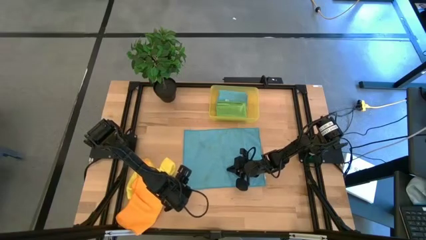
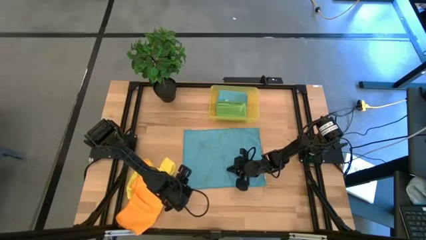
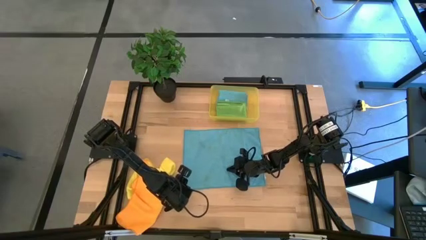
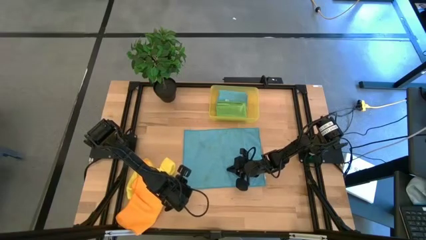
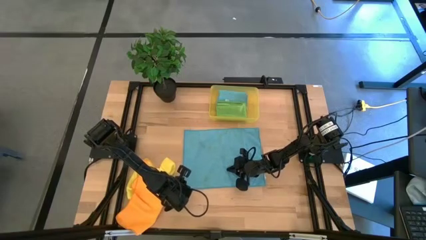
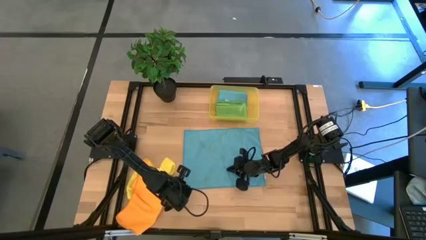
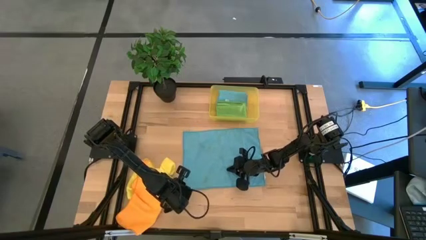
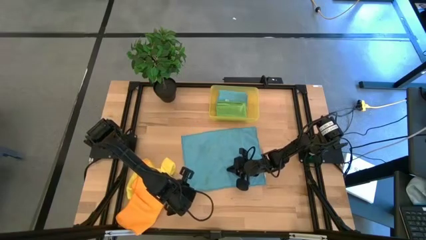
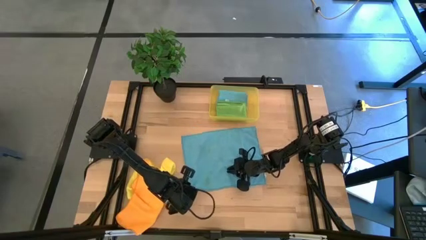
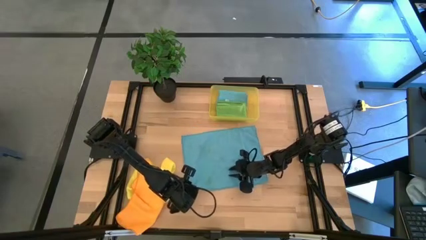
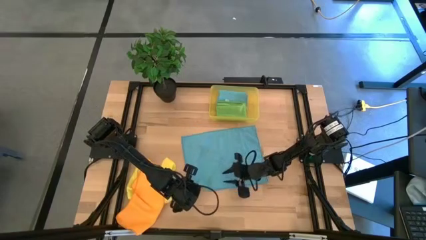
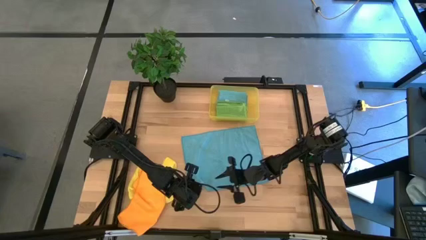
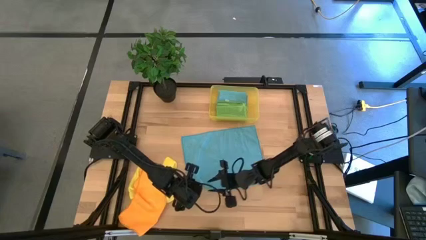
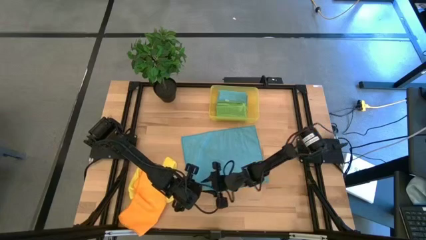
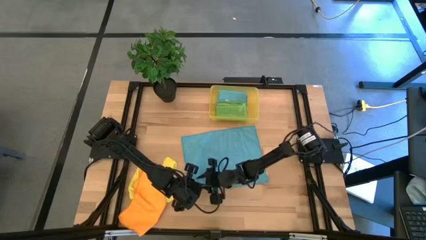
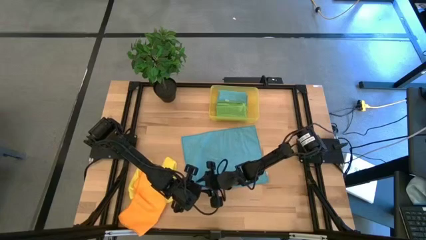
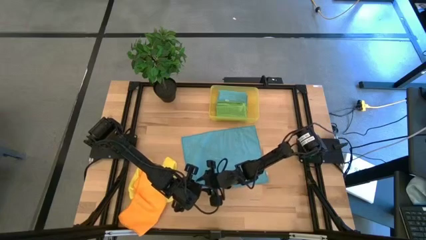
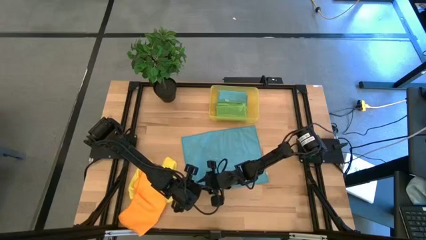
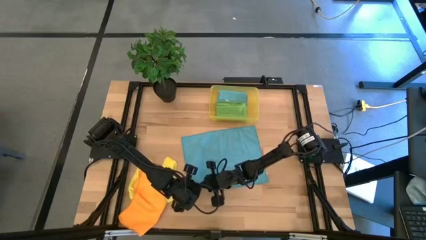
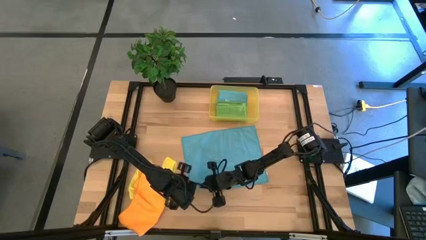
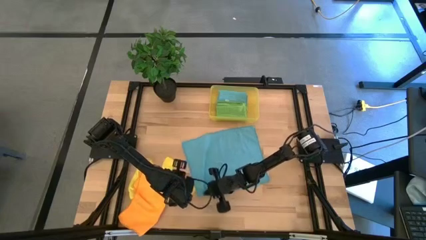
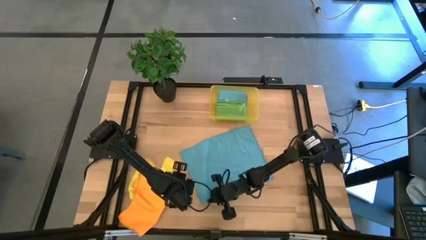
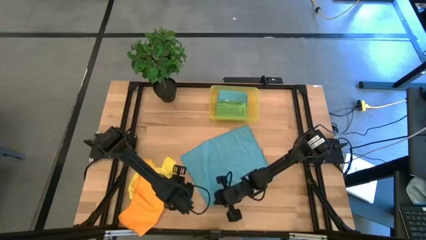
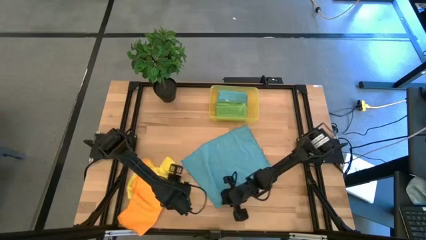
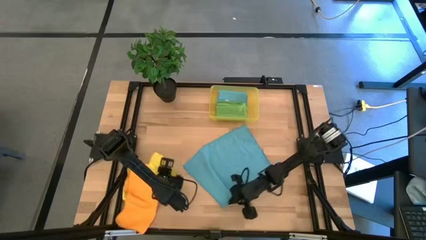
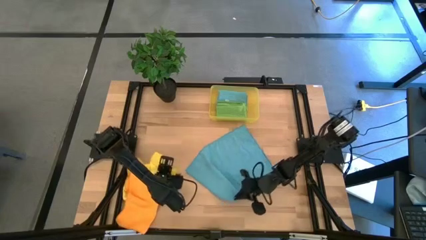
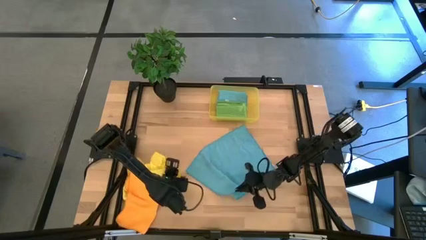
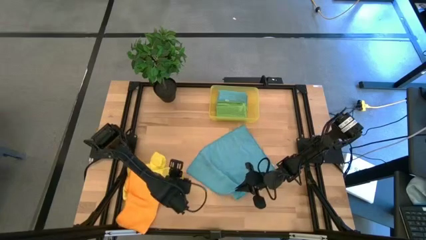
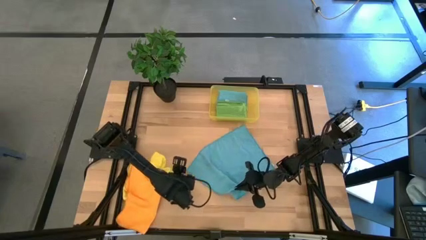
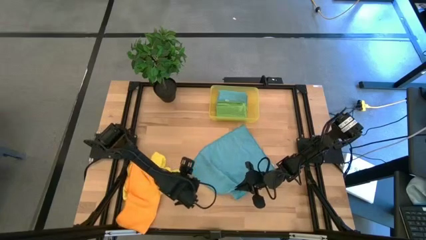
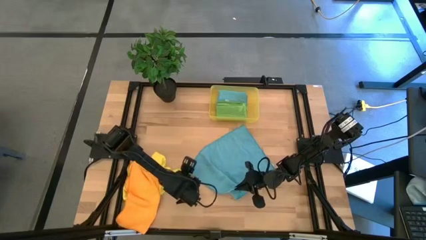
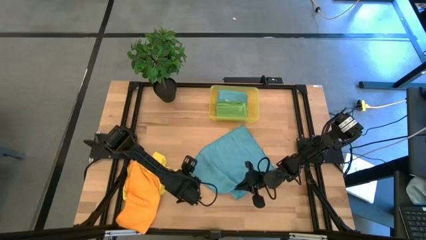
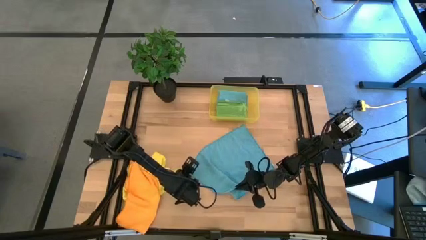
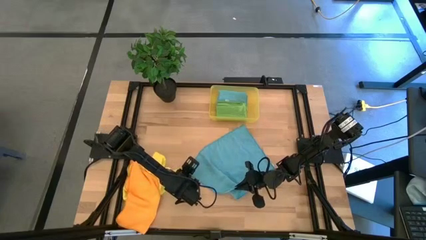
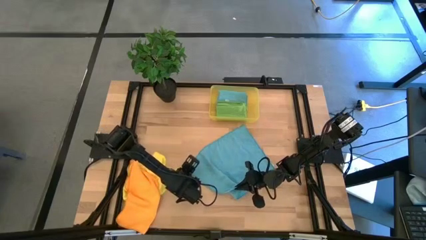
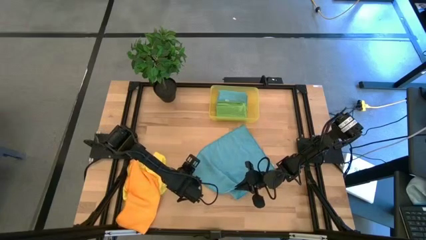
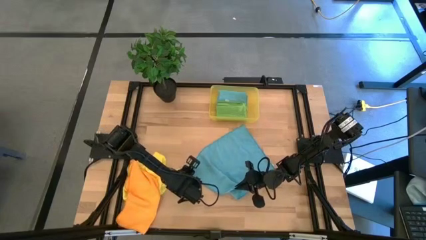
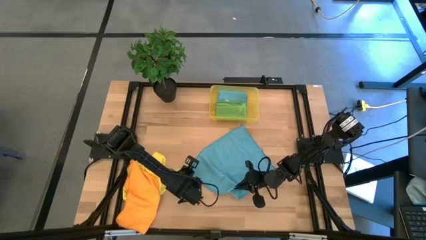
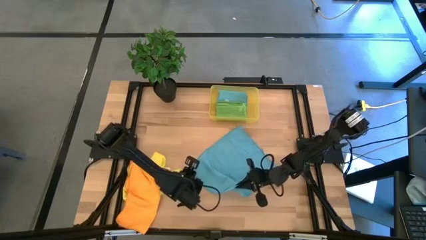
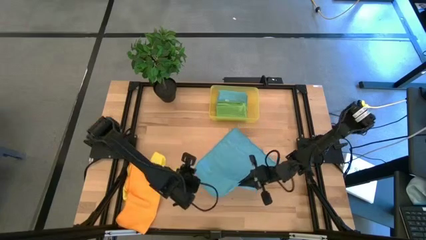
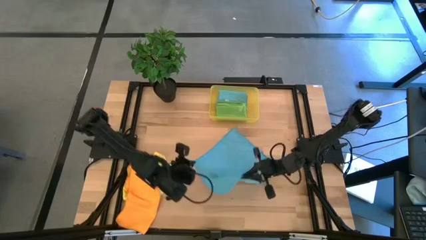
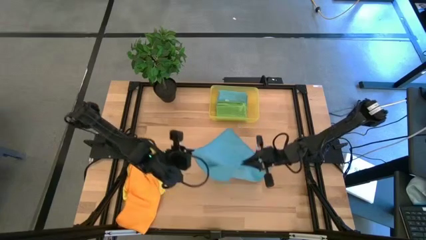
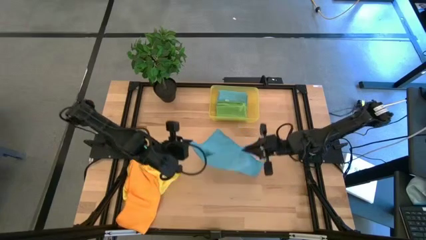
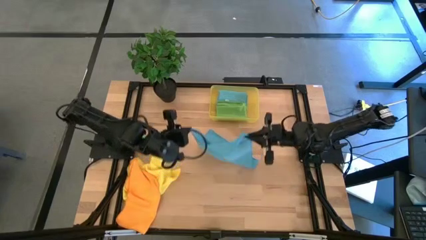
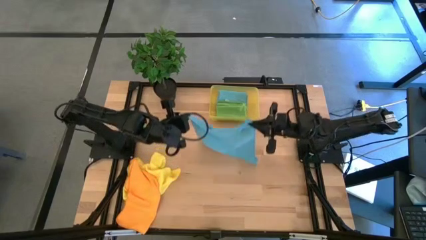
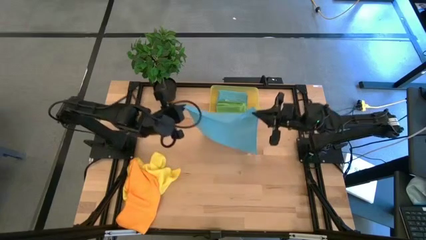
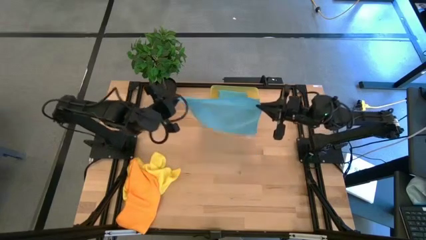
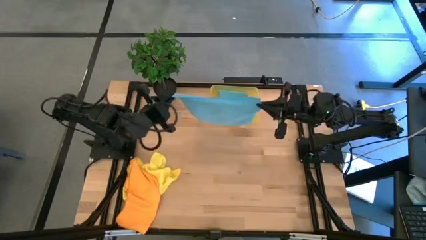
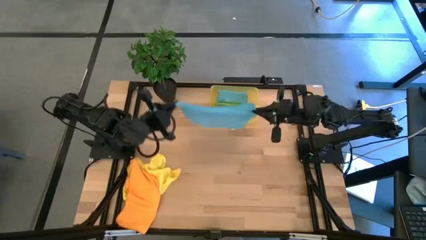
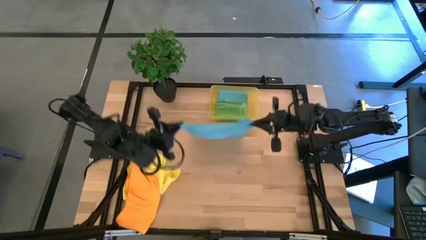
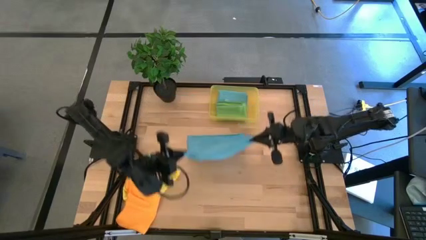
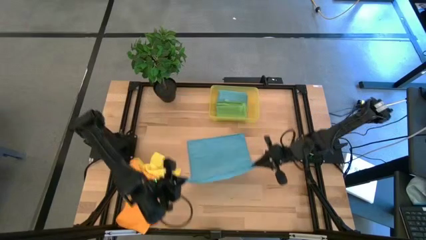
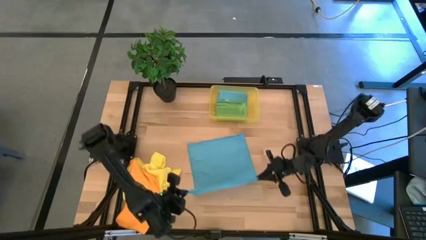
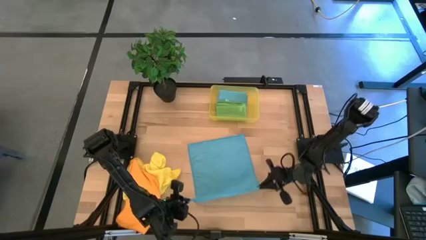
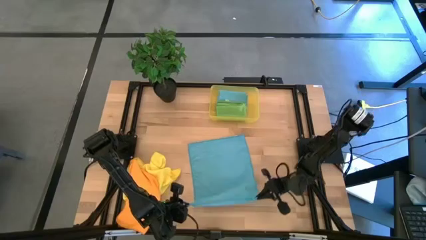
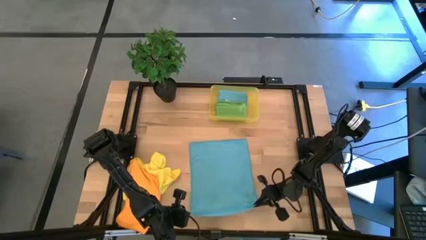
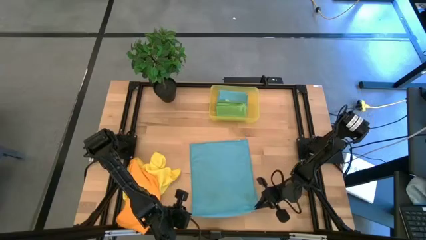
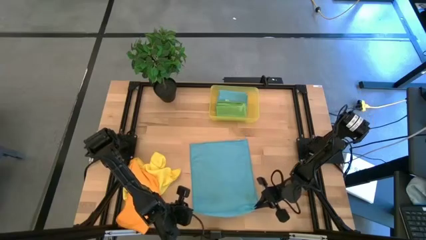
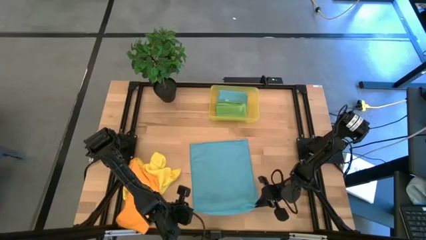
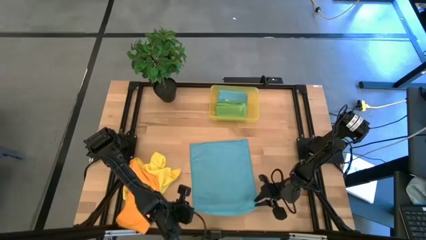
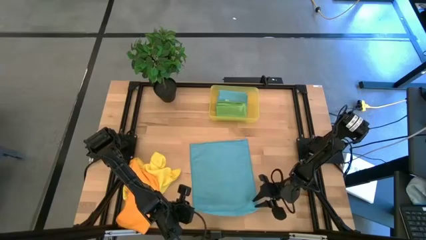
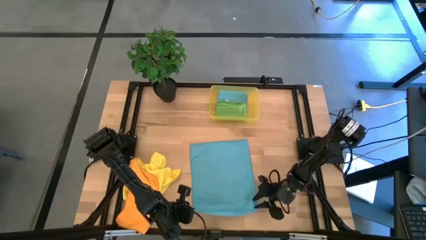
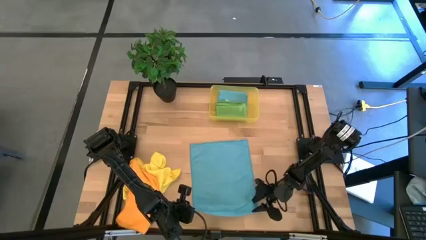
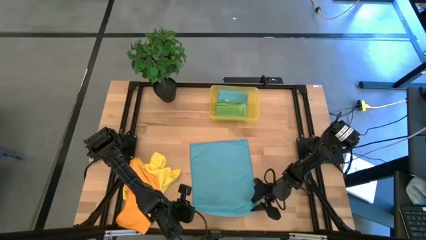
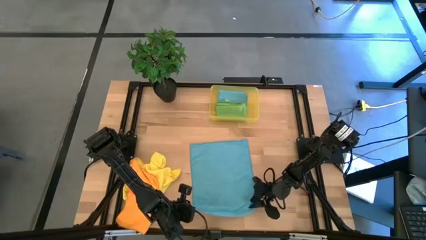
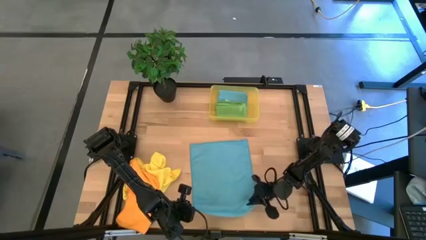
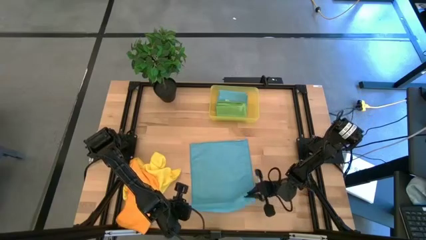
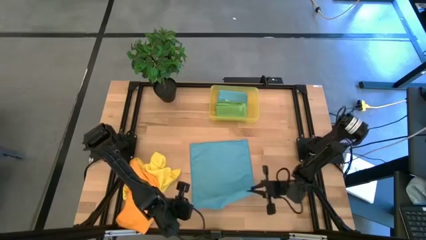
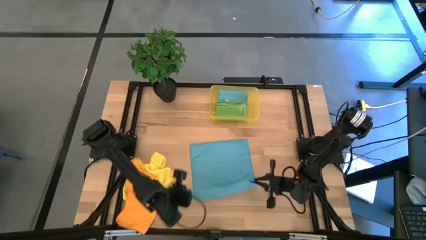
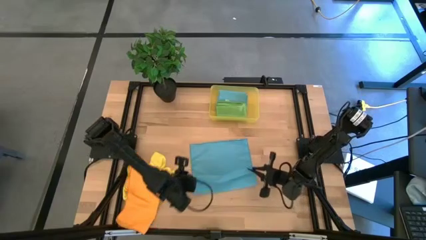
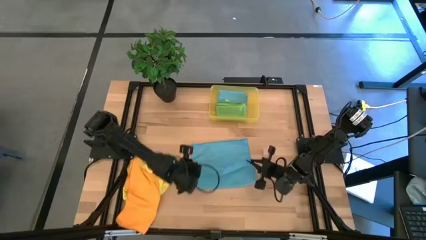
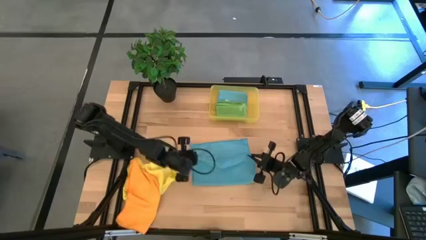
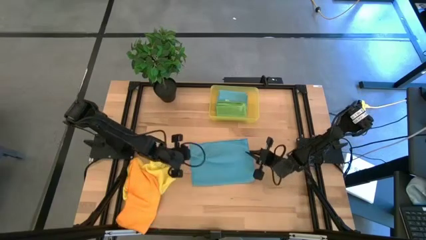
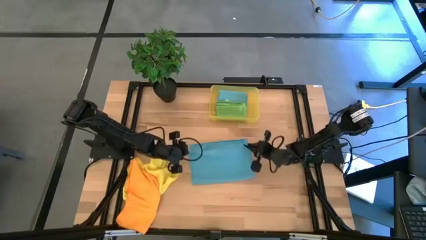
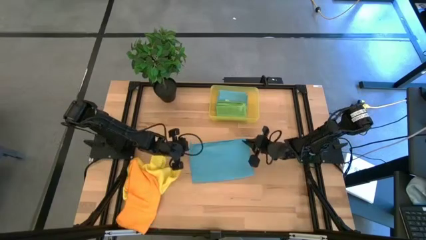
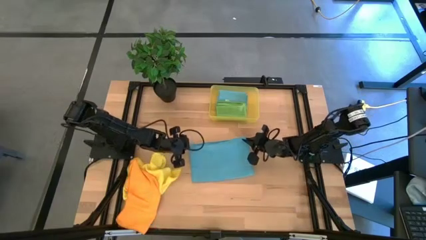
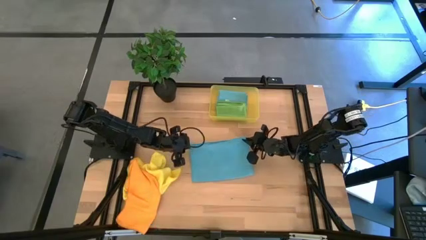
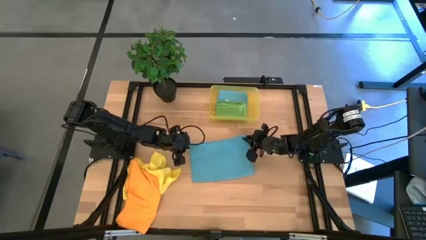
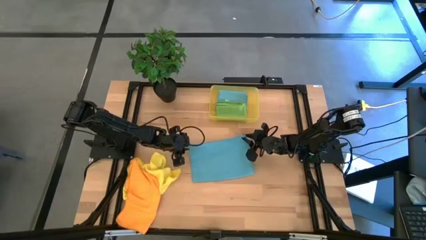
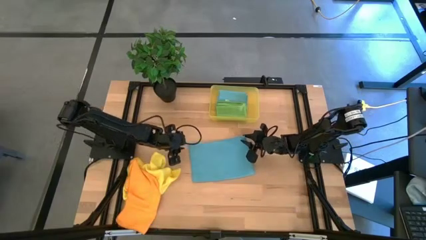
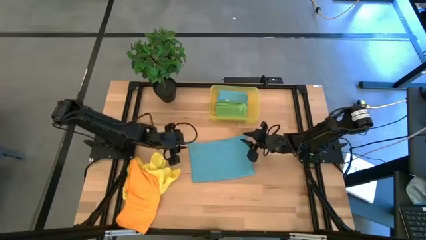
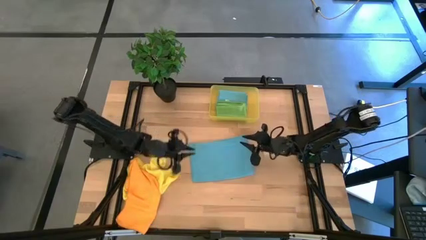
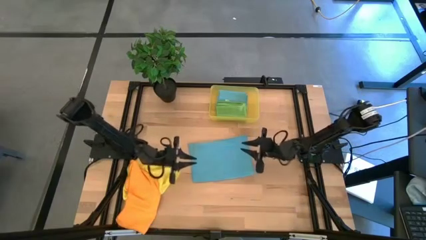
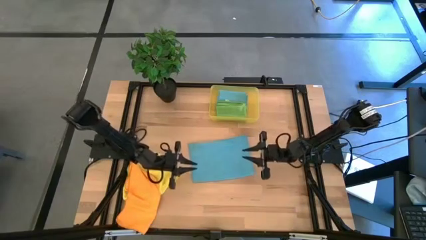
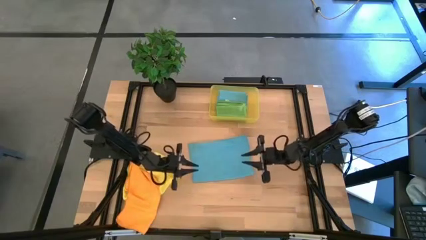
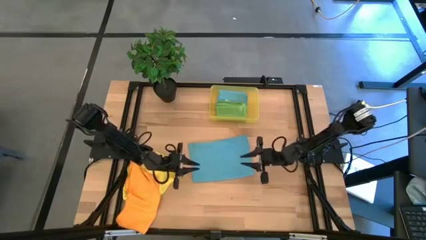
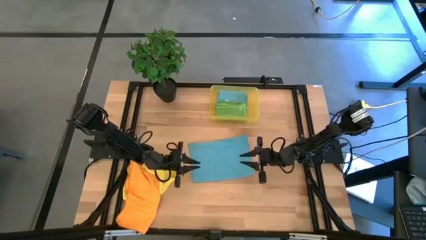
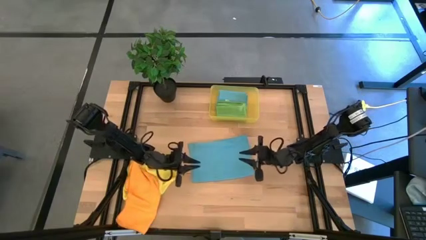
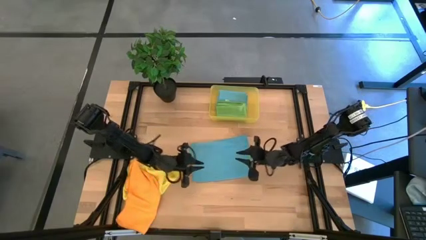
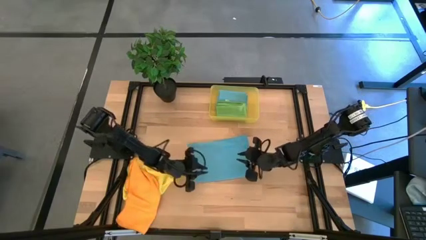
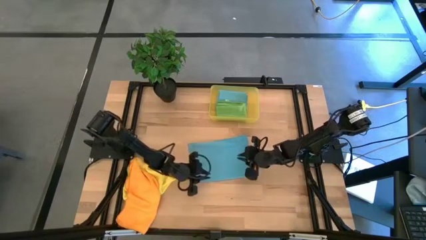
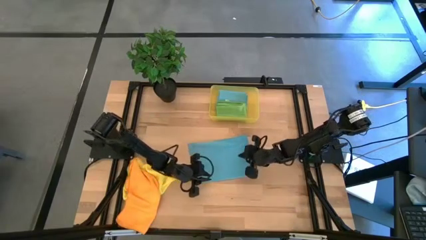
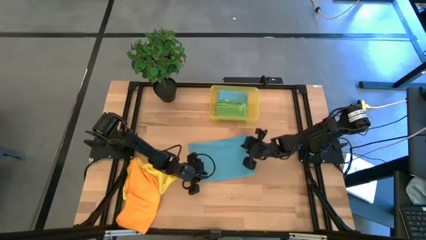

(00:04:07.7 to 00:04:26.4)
Task: Fold microfiber towels
Fold the blue microfiber towel
